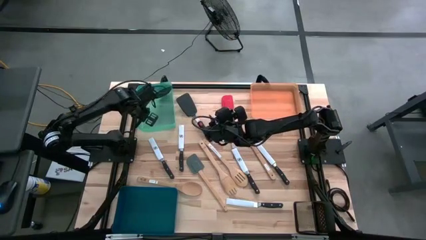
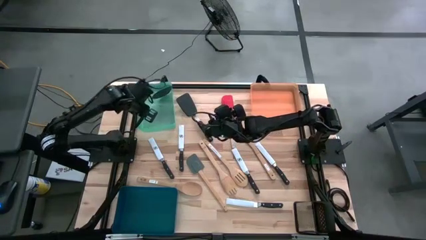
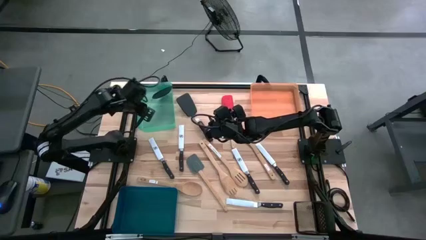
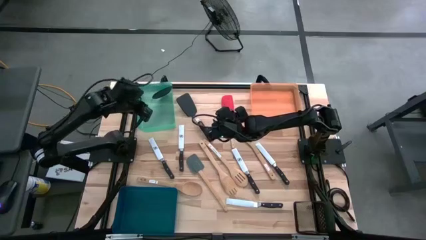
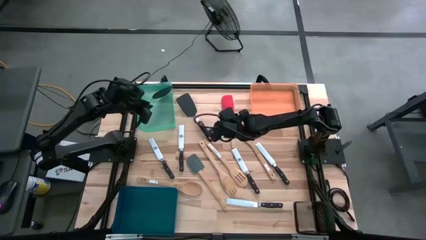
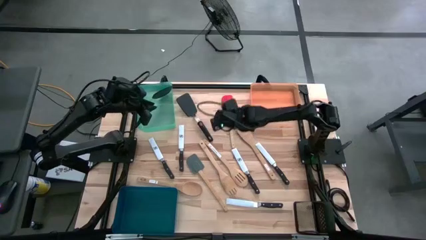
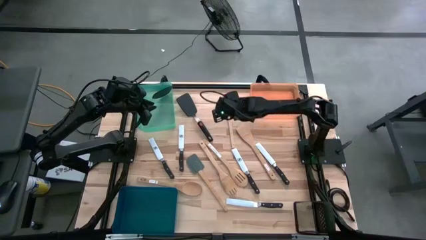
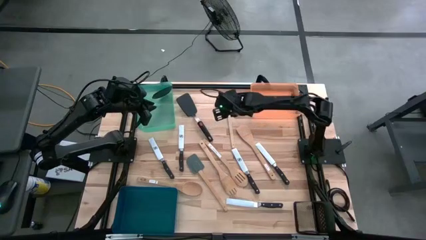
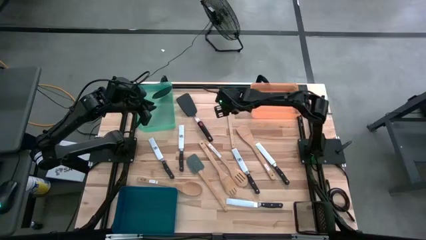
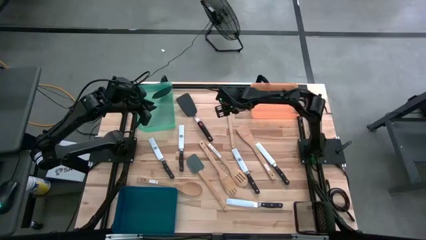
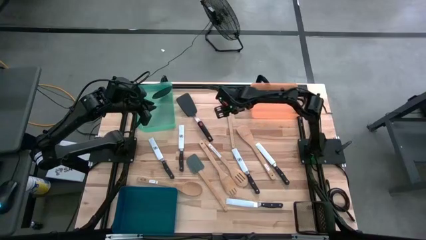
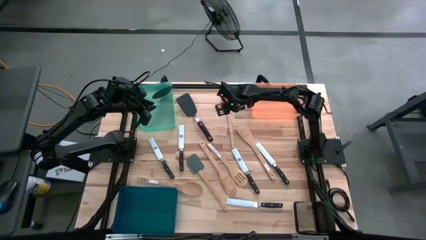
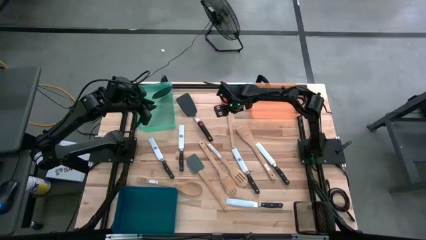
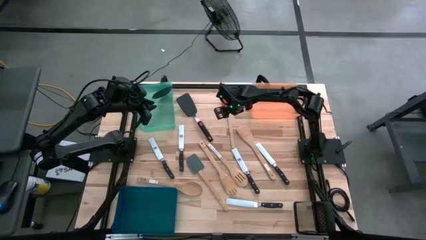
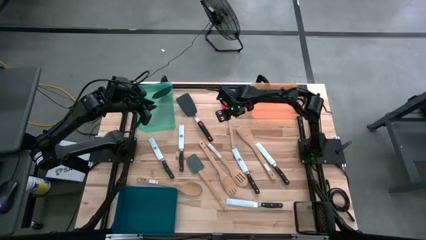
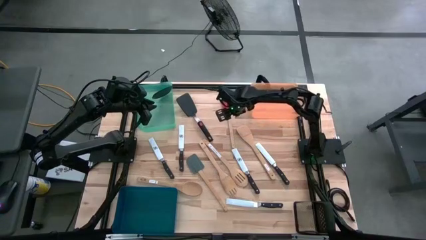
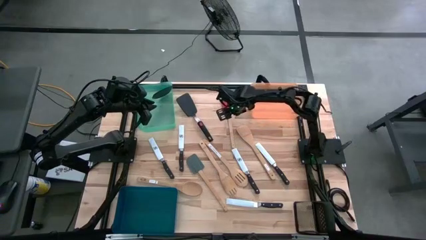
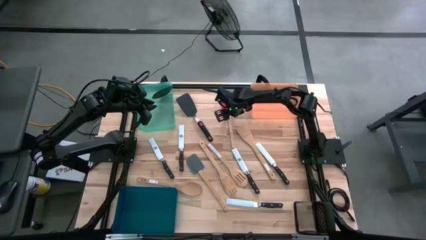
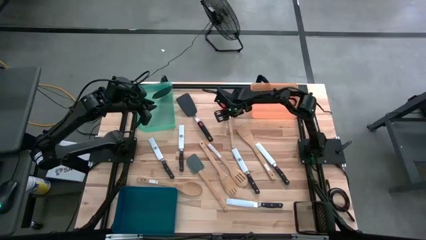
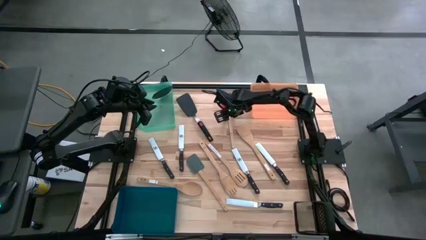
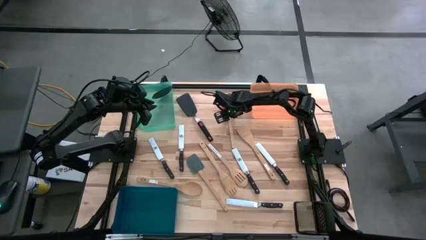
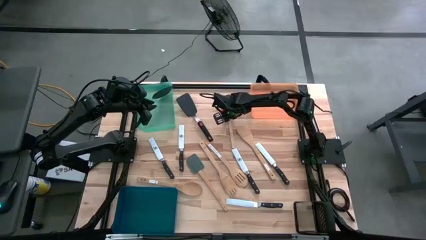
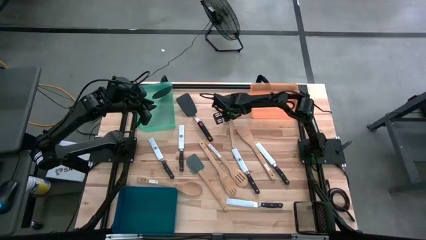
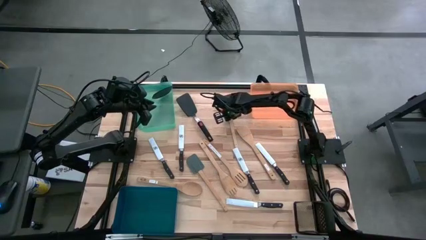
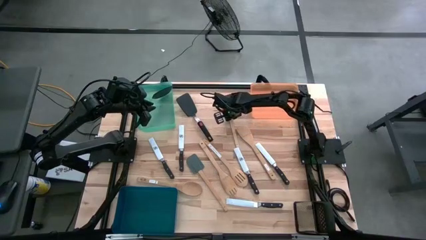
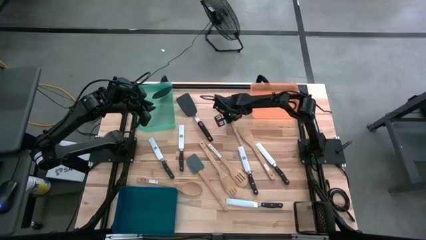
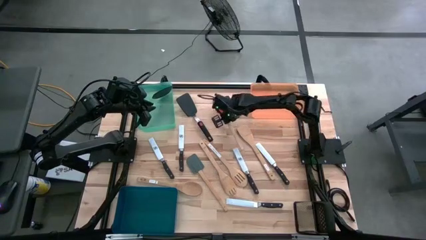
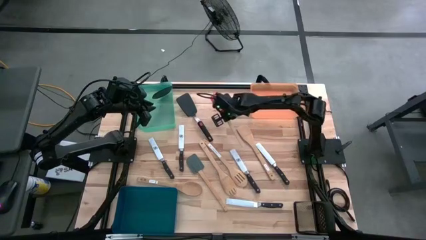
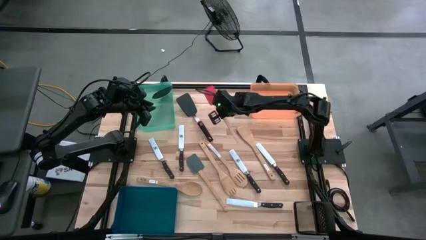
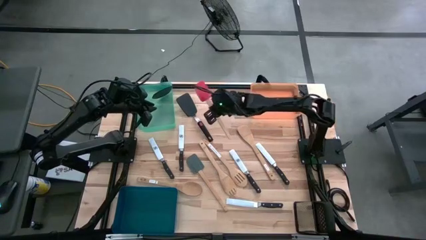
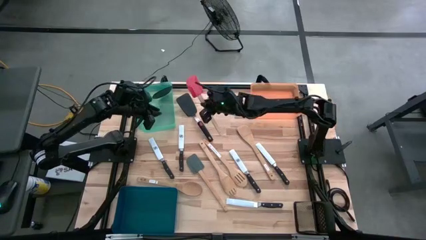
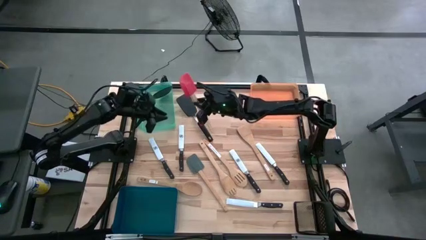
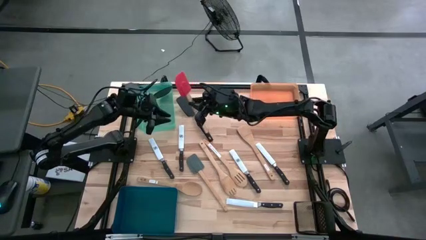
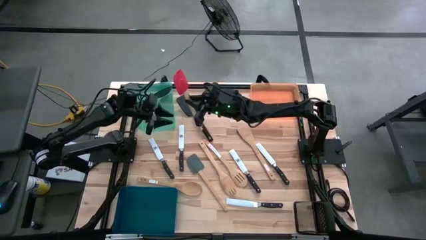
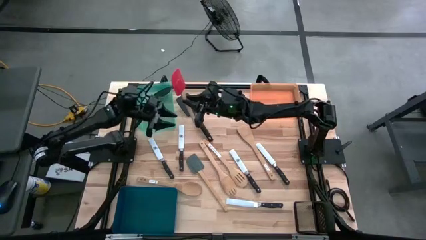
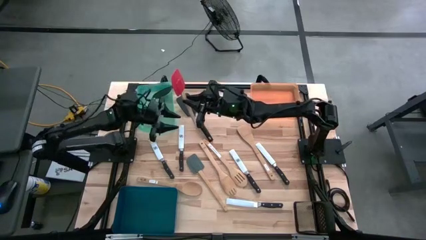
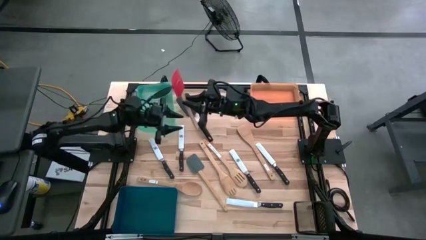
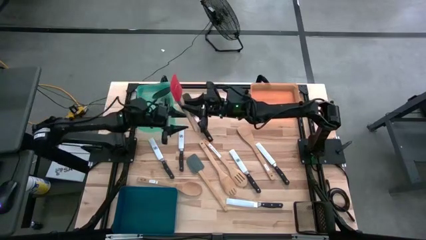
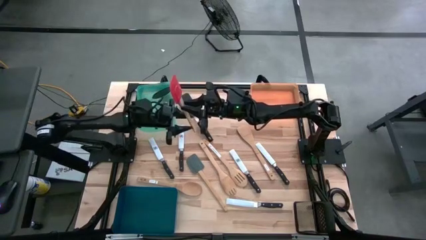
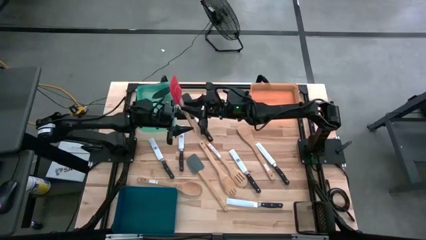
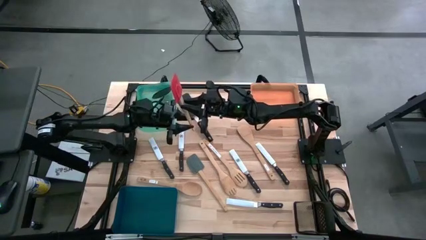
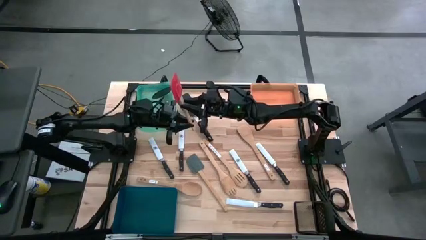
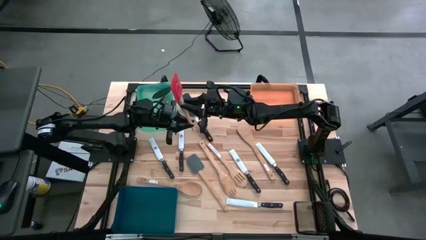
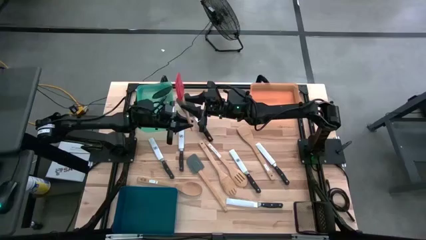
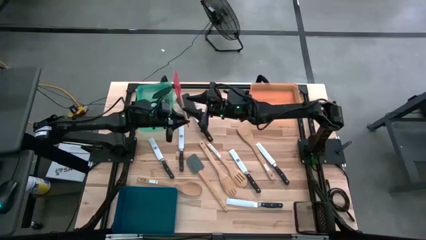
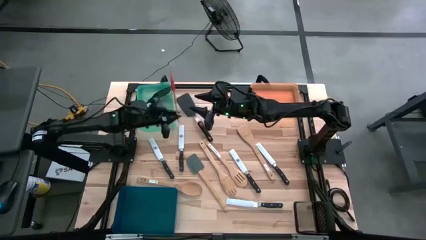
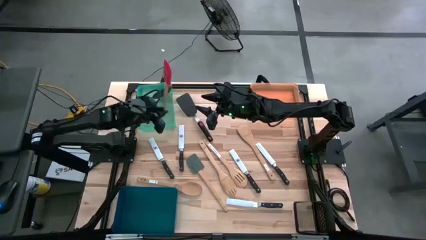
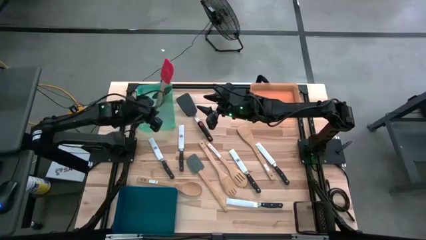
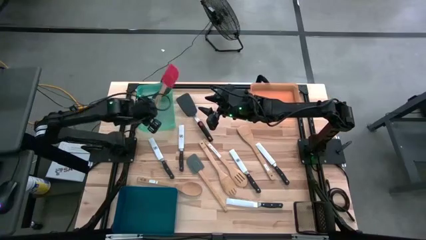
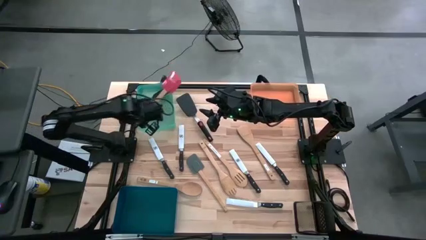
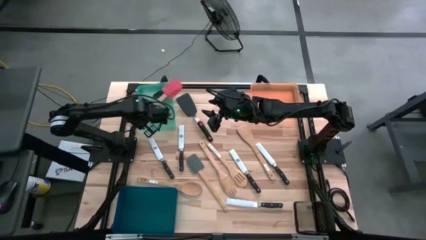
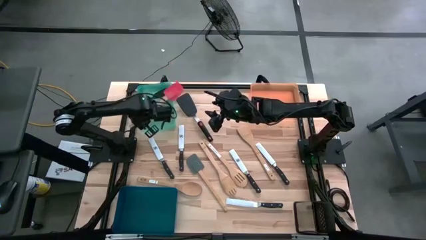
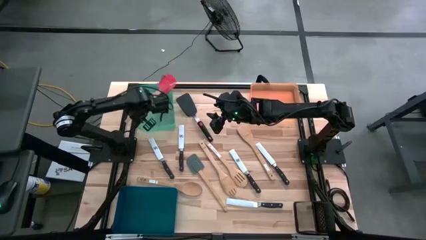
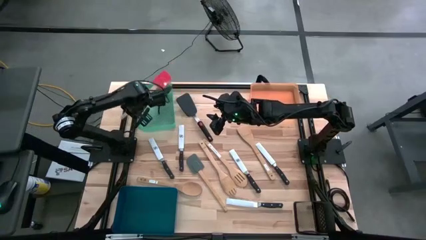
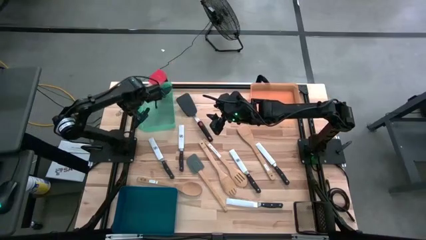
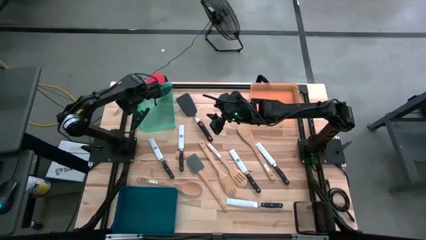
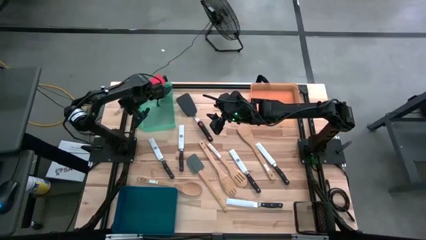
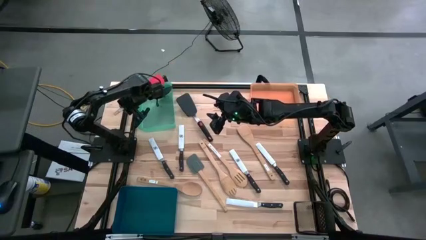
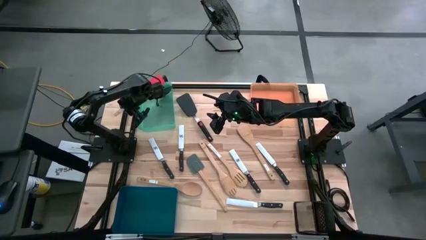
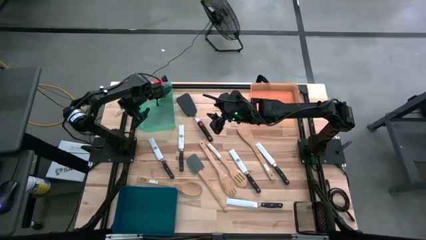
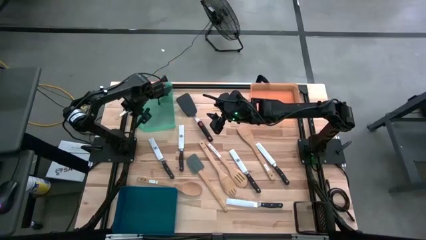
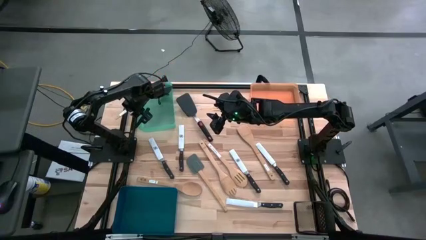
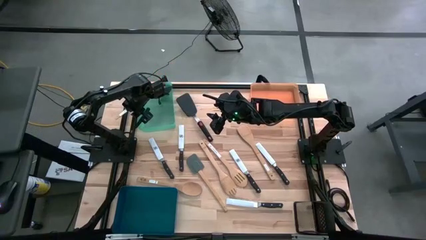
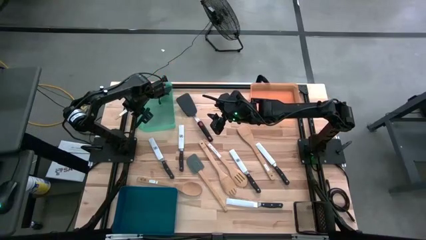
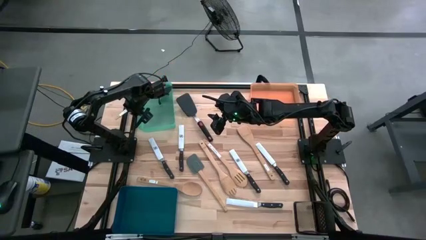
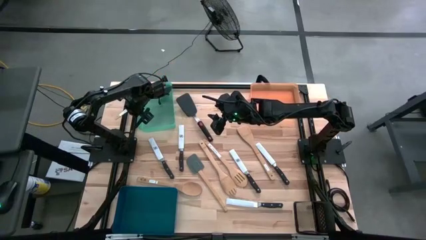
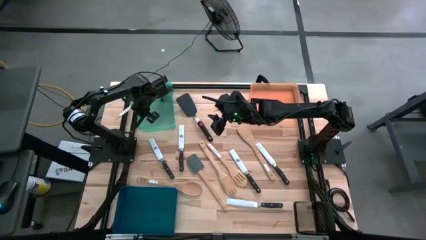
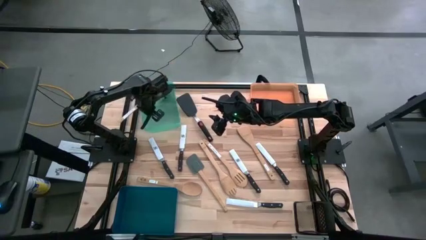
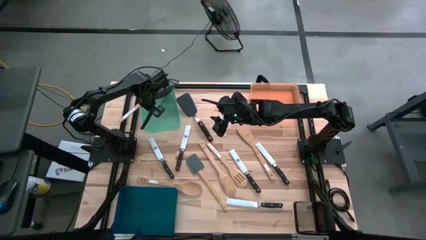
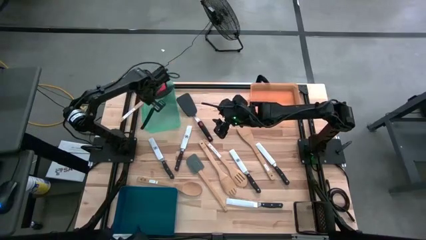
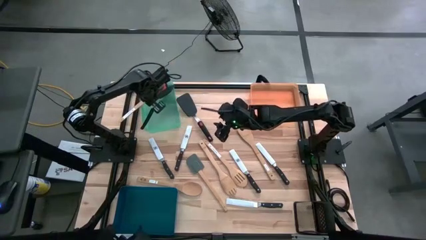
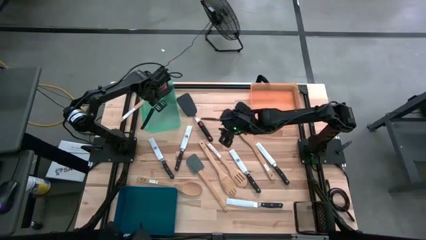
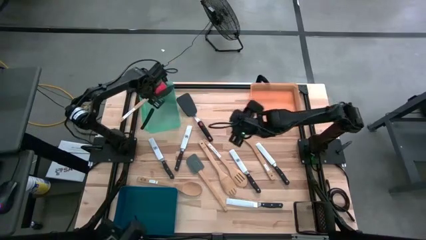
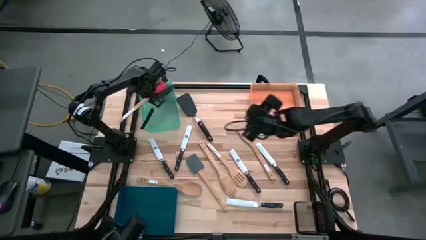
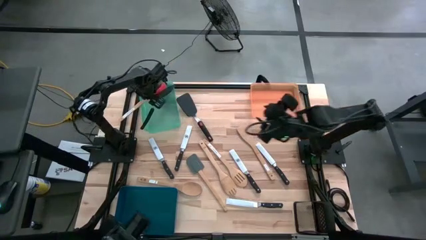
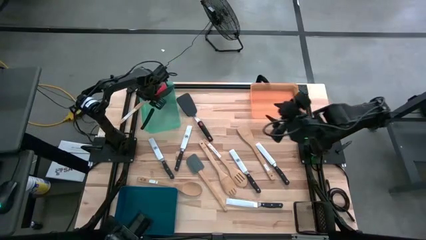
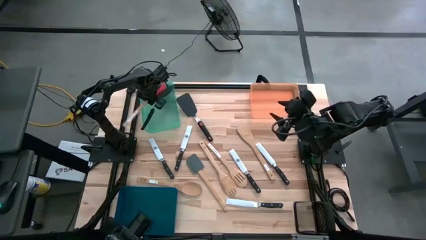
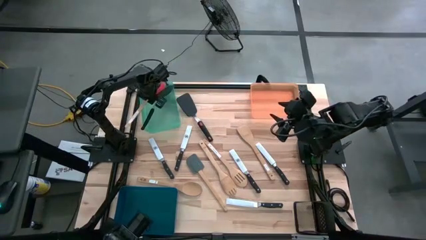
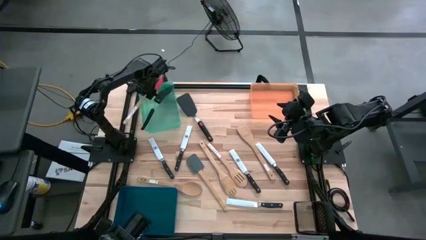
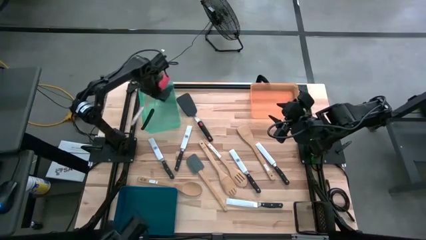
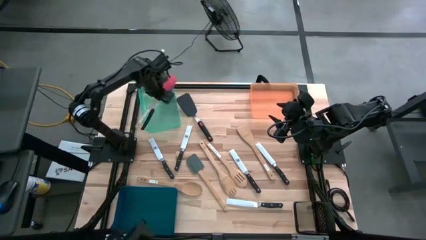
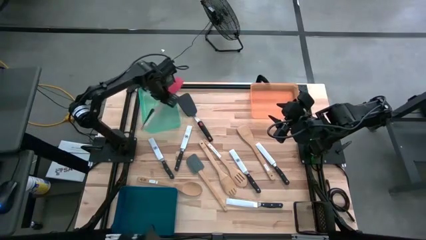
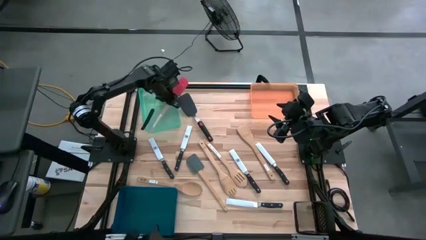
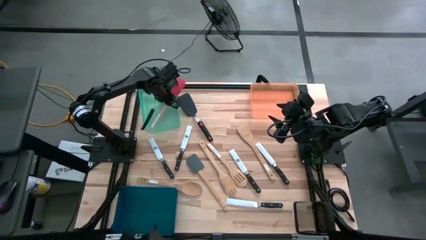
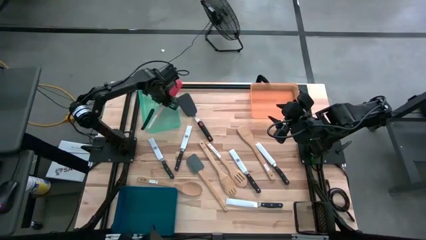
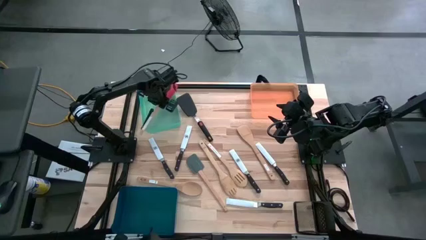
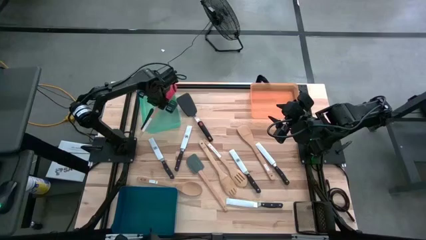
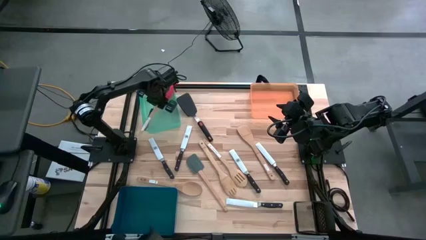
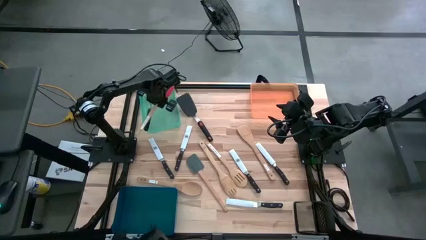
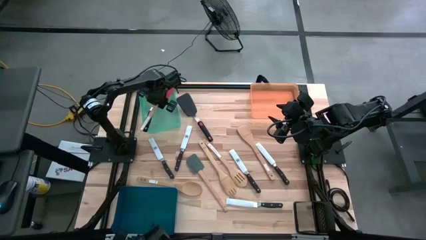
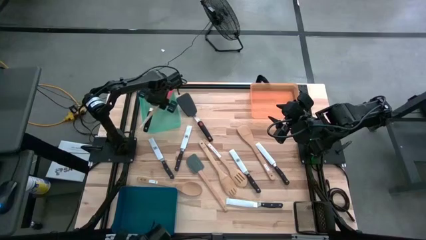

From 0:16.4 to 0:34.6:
Task: Pick & Place Kitchen Items
Put the red scraper spatula into the blue green bin
